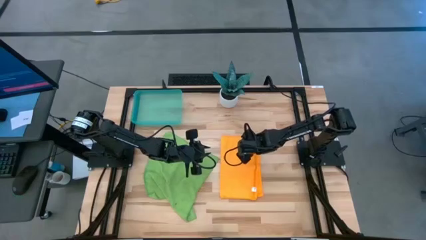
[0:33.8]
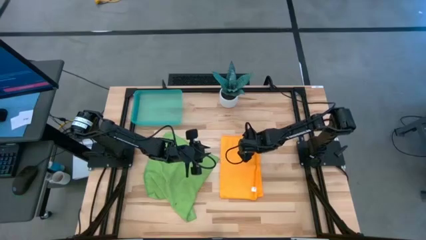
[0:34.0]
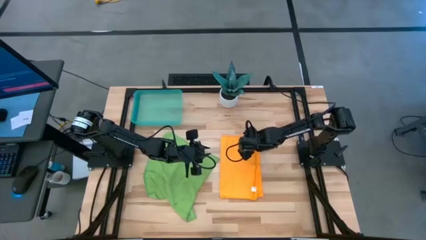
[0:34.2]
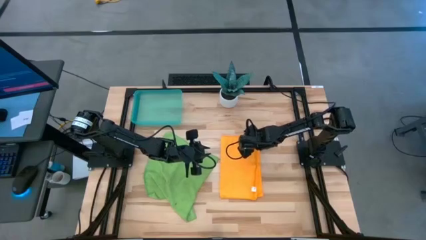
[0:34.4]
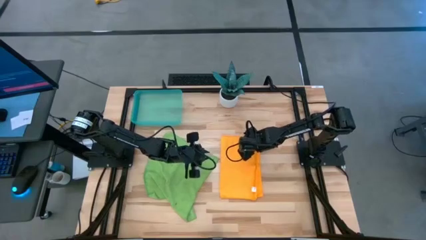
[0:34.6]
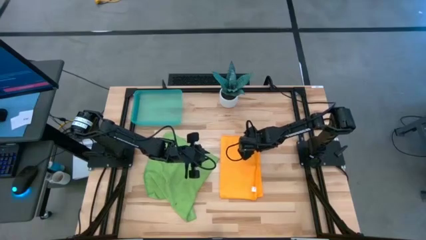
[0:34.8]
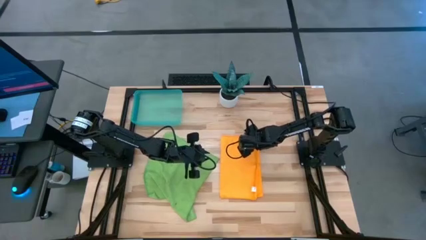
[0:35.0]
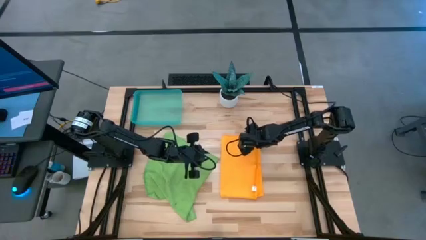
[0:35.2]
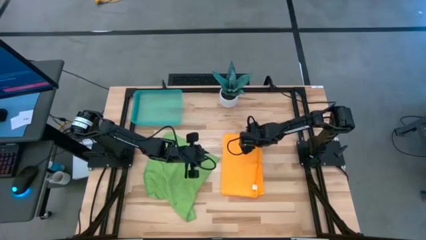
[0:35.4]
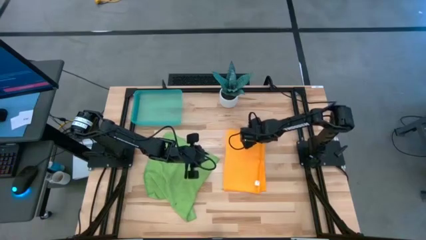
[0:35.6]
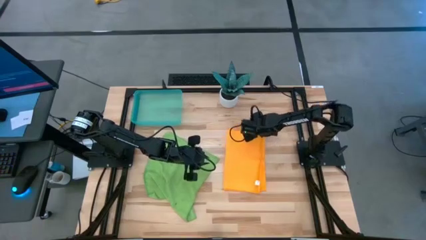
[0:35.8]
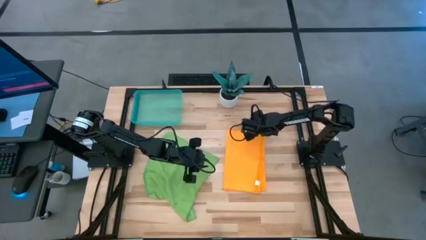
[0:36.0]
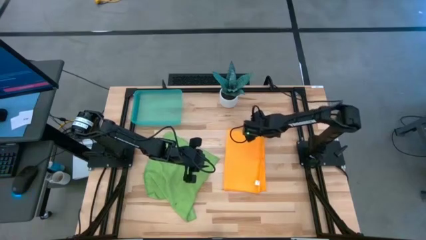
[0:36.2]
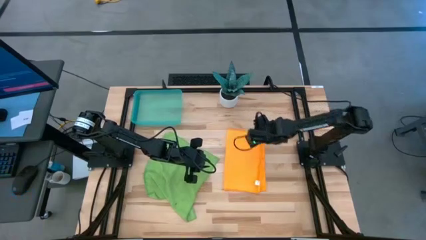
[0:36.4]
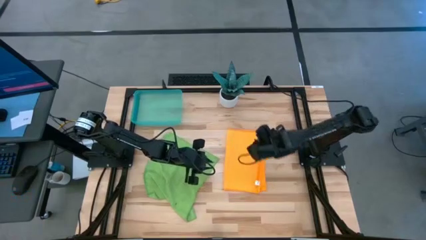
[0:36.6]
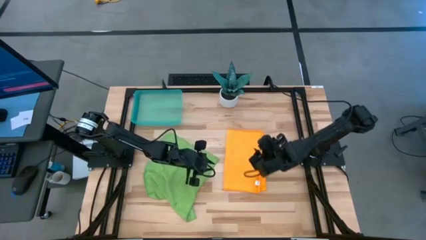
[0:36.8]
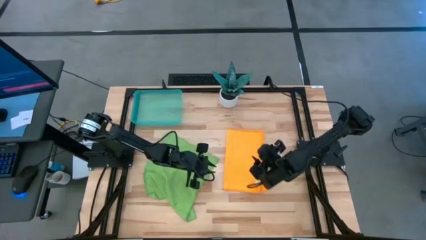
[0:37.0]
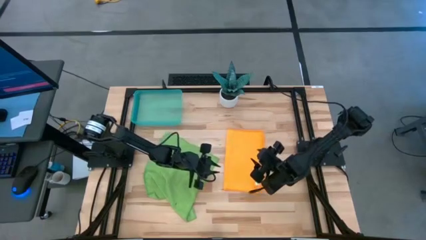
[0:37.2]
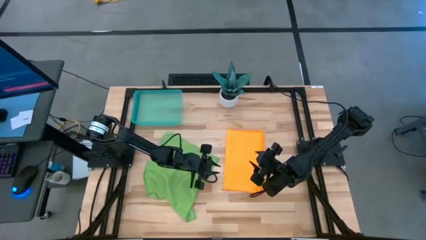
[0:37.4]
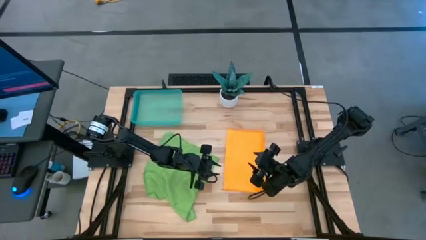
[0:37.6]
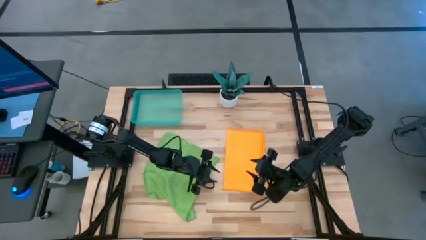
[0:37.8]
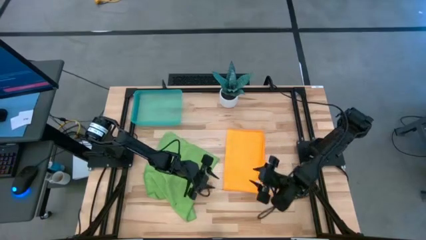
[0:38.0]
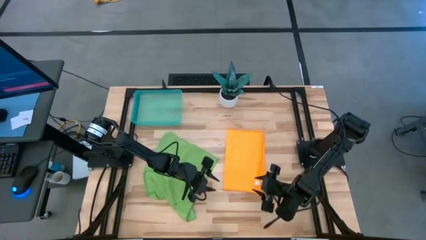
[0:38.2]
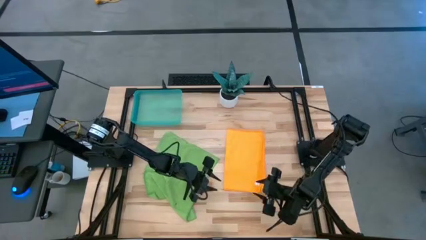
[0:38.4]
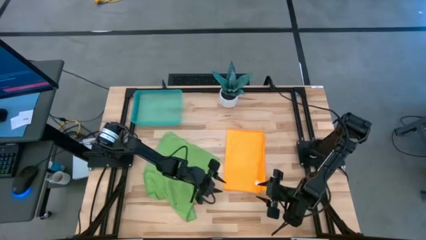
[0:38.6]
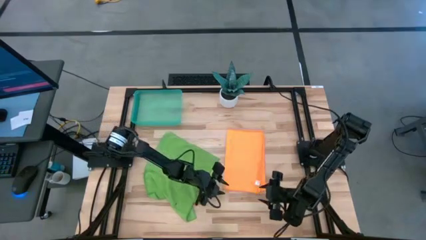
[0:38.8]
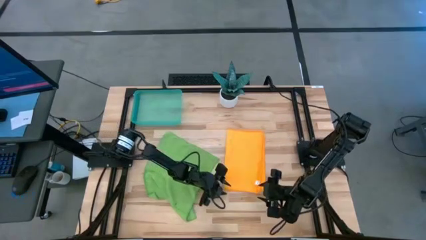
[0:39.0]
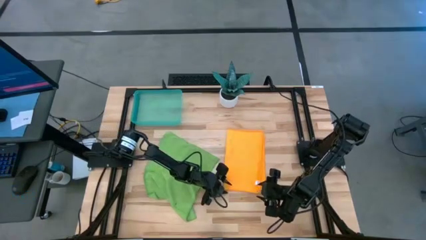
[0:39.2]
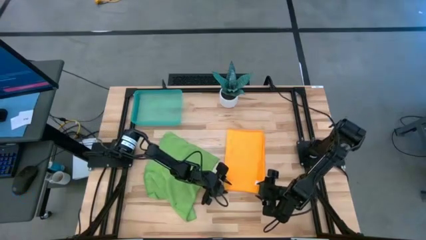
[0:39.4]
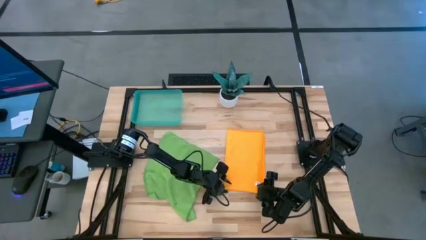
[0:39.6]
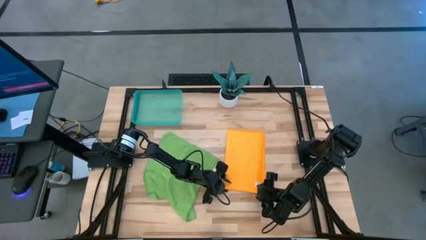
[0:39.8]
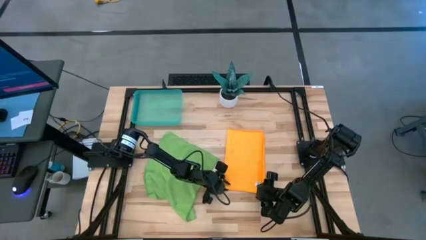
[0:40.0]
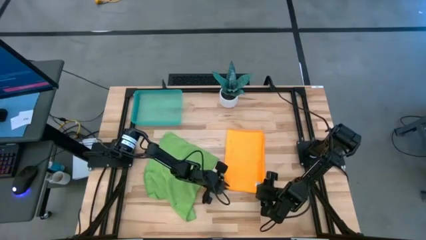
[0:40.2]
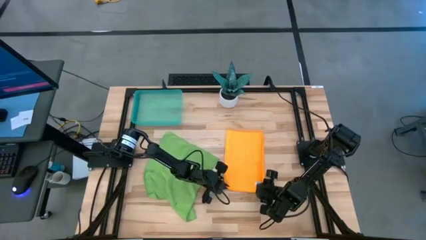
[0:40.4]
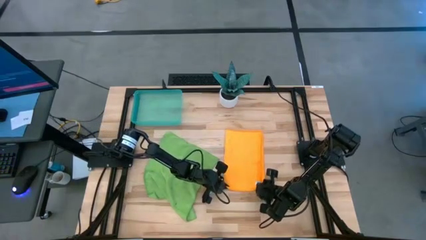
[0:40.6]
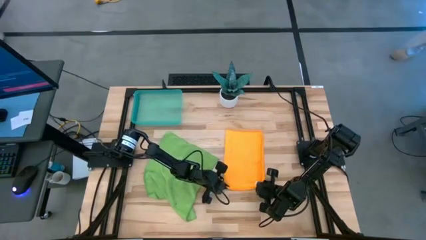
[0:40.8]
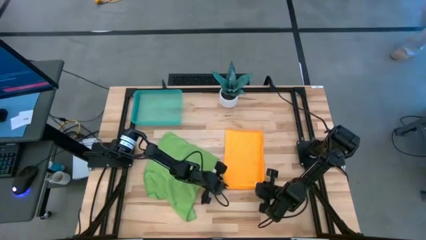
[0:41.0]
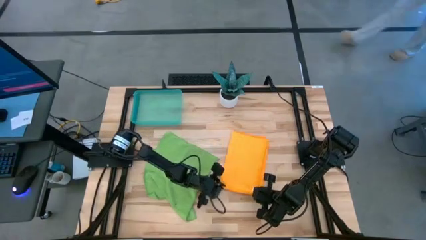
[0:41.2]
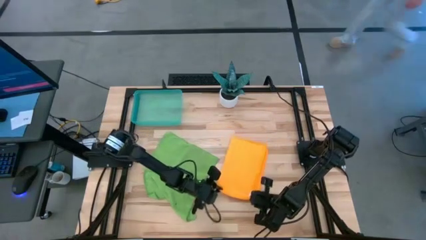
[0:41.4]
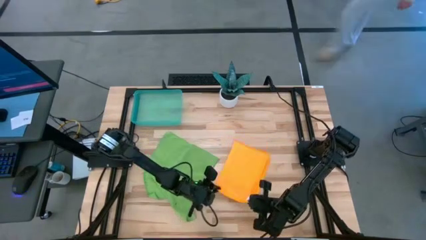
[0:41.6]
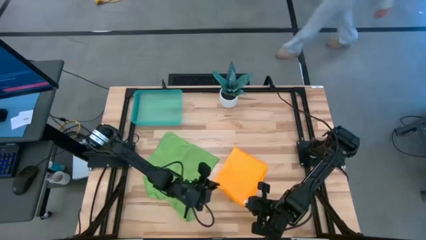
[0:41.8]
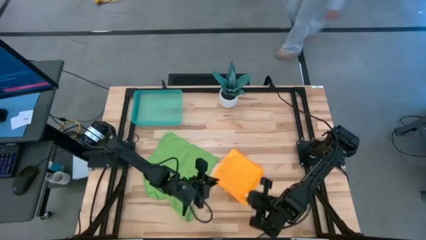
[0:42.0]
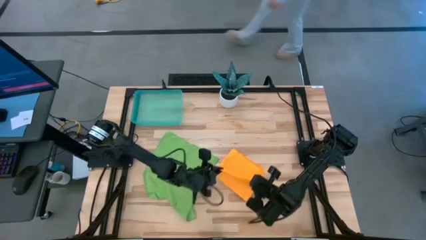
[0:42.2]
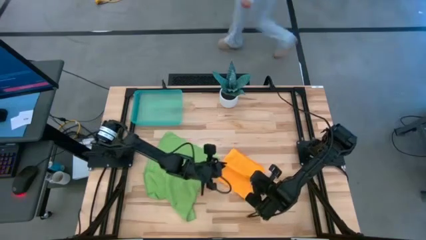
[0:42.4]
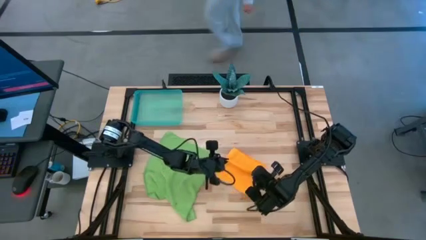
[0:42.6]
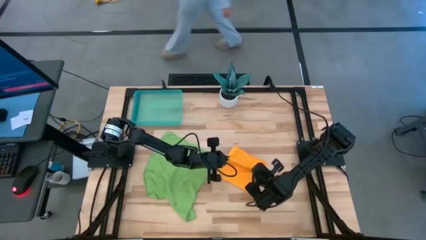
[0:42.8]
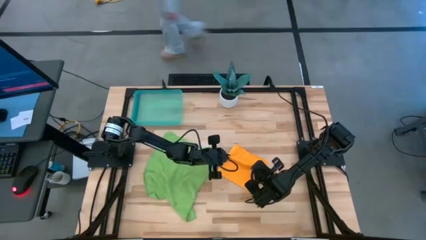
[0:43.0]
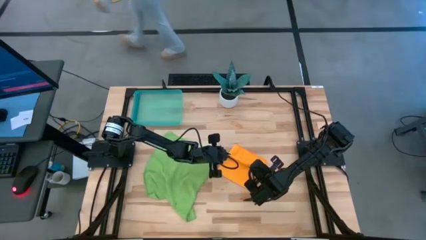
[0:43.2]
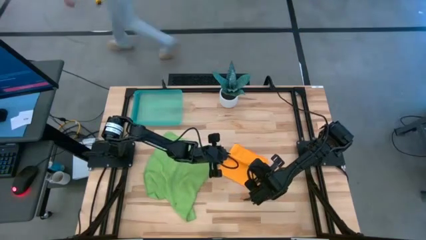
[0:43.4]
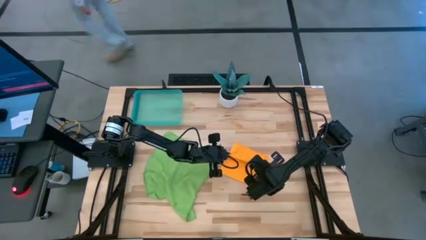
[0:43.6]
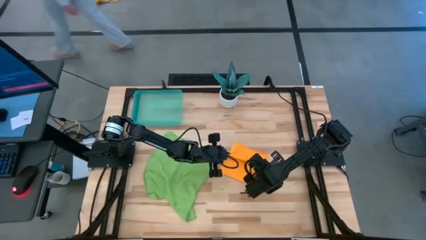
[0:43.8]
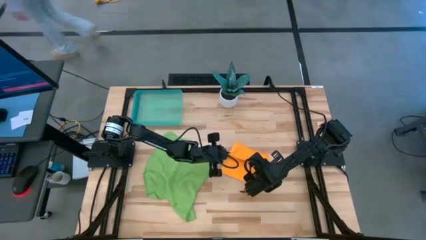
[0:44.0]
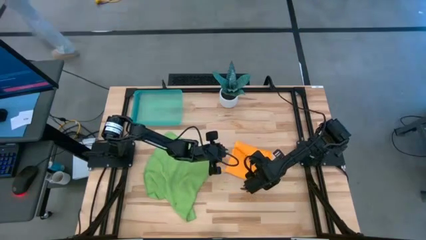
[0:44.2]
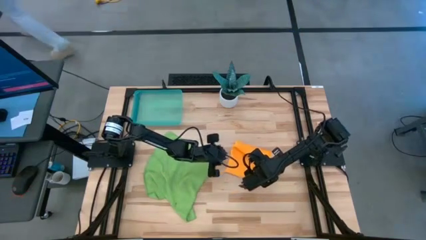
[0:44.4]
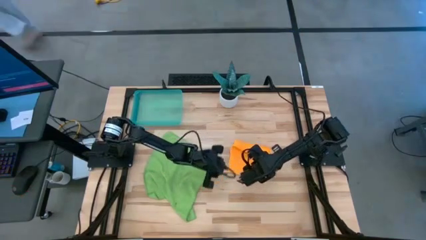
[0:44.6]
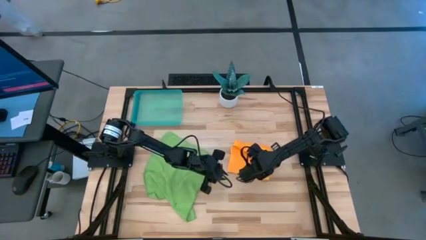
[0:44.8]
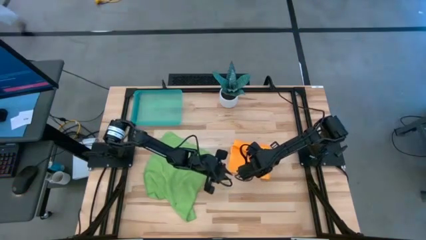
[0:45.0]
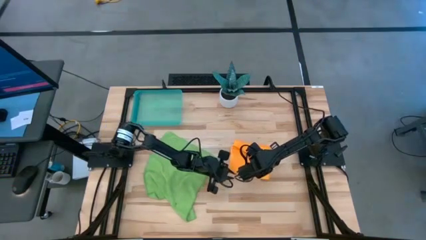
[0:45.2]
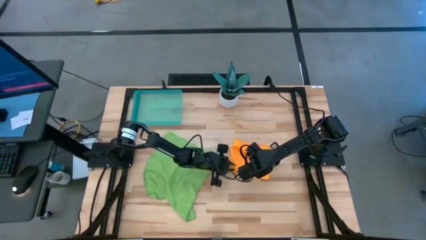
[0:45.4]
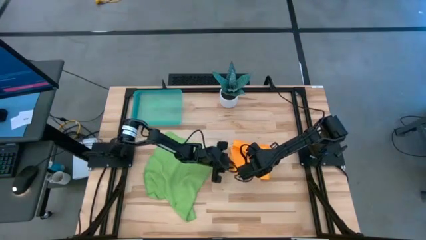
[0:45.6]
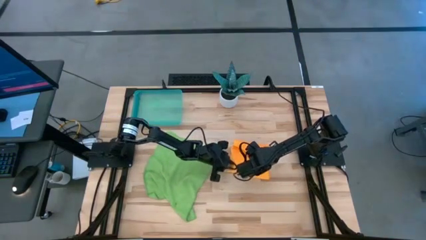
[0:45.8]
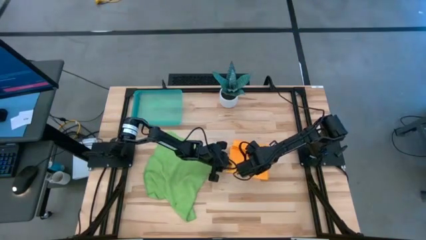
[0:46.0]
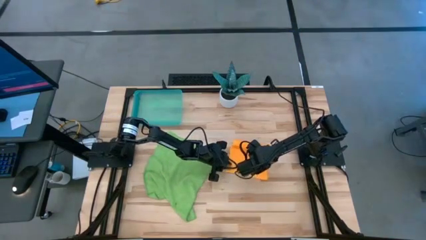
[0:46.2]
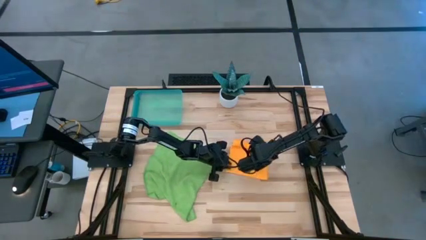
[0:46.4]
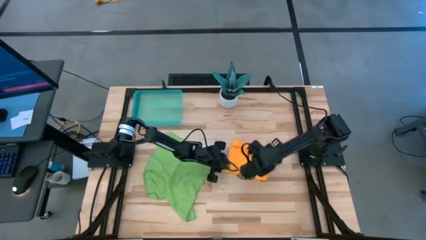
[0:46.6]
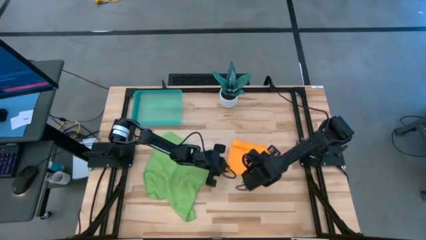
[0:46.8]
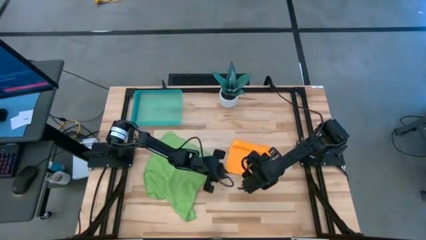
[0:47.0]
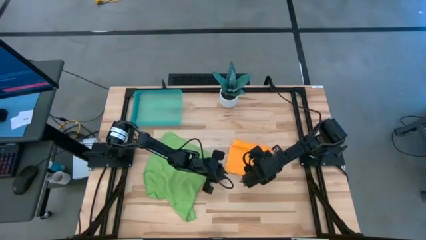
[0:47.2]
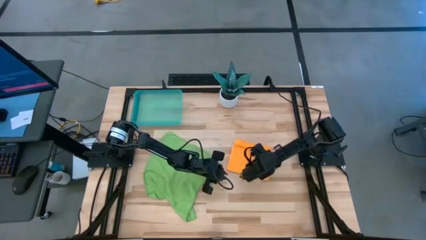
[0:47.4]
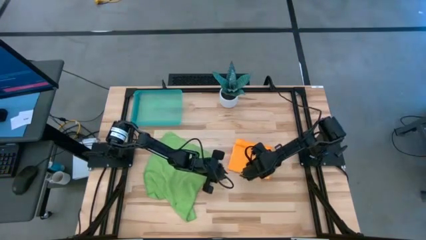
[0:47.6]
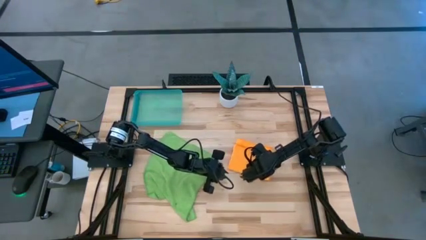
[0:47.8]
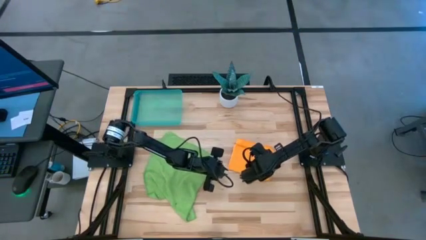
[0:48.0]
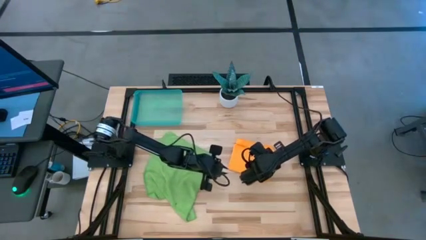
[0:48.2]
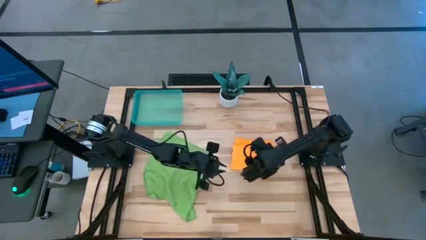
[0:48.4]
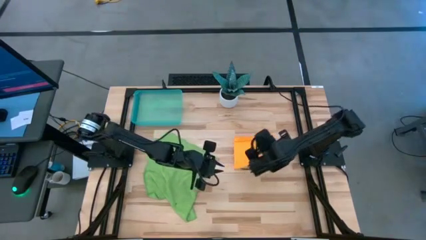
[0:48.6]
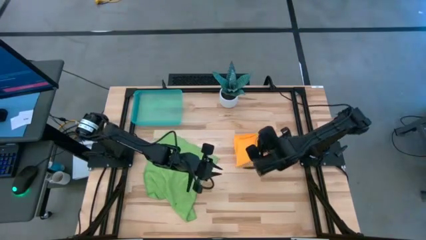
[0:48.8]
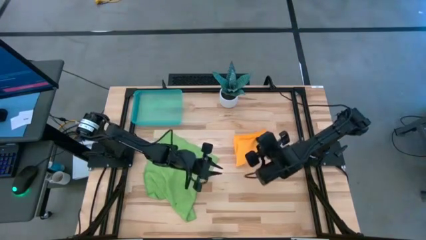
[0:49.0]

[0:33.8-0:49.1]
Task: Roll microfiber towels into tight, uniform cylinder then place into a basket
Fold the yellow microfiber cloth

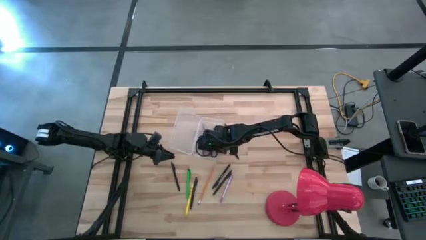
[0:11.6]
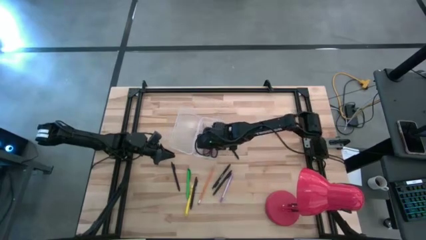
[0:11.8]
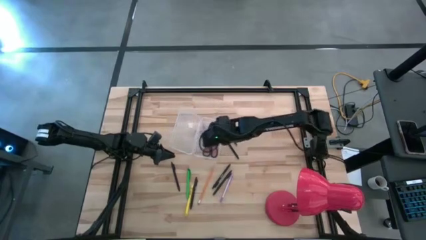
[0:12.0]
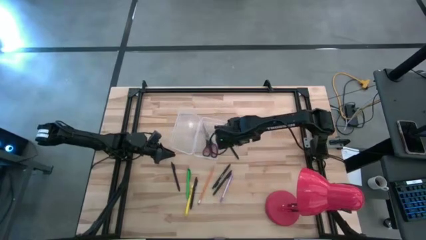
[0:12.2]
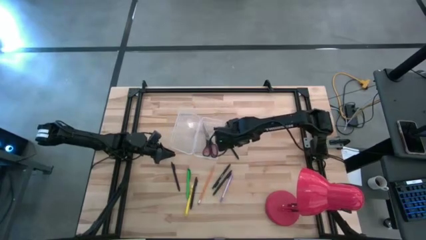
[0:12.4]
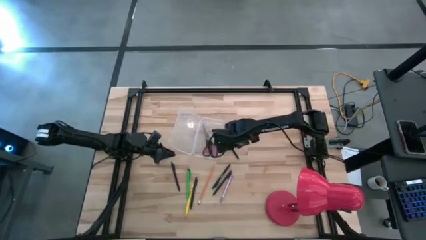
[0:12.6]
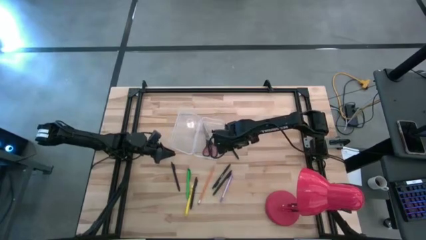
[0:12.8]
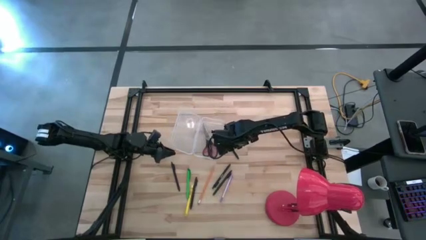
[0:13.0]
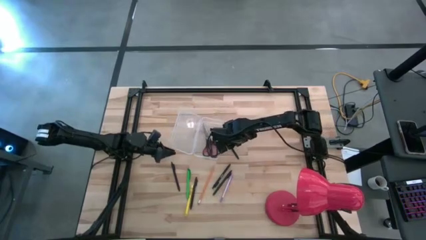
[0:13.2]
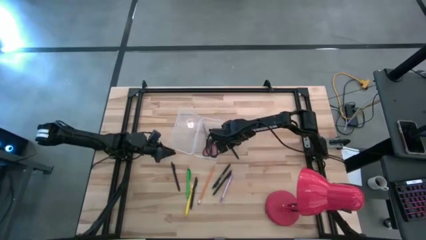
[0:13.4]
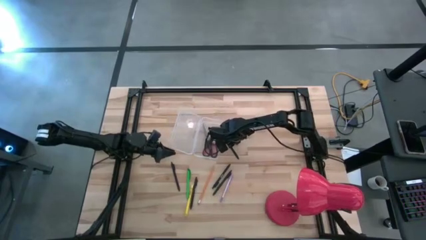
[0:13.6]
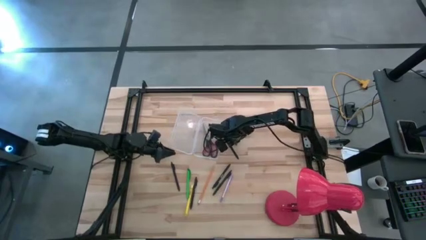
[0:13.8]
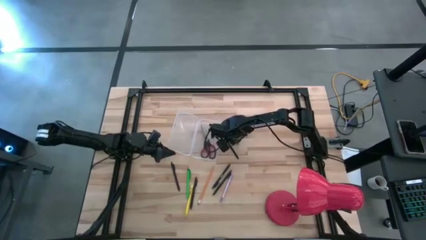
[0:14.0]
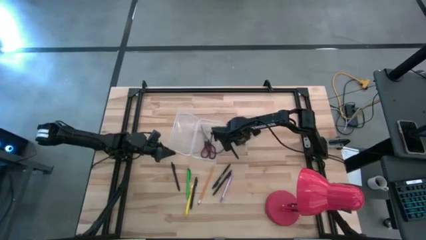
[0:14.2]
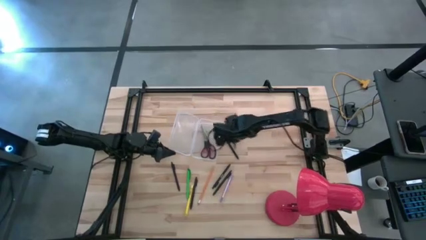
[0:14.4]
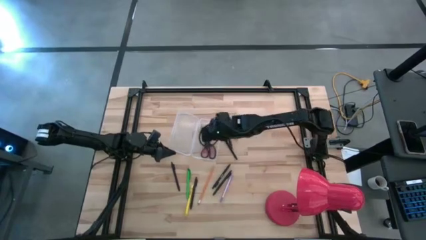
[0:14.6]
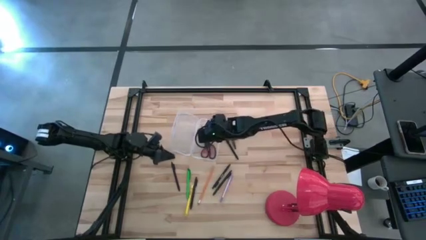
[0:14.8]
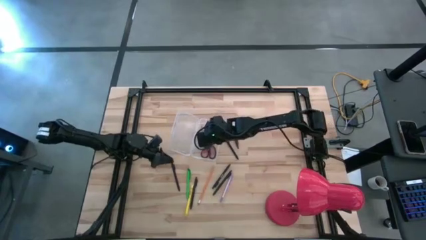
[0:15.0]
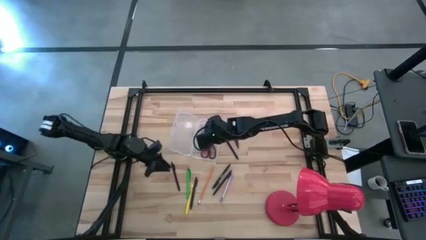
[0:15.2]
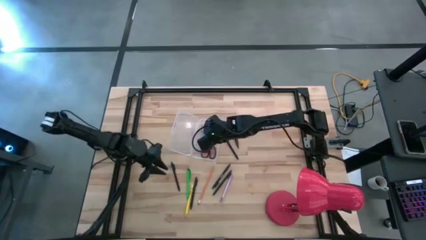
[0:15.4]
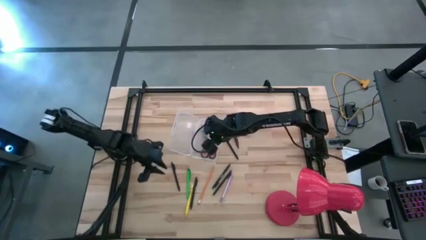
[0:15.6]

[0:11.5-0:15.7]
Task: Pick & place school supplies into a supply box
Put the brown pen into the transparent supply box
